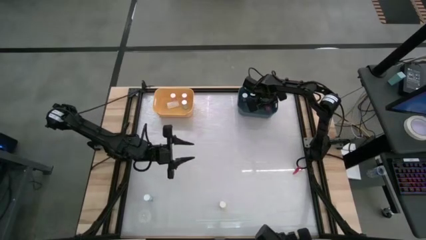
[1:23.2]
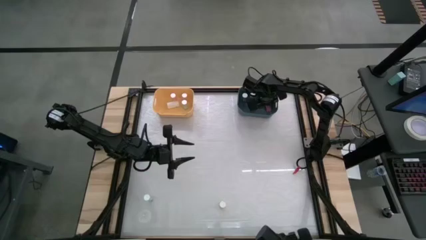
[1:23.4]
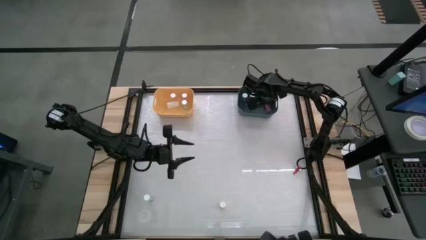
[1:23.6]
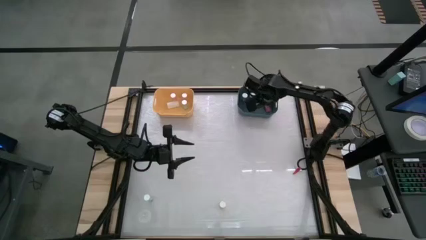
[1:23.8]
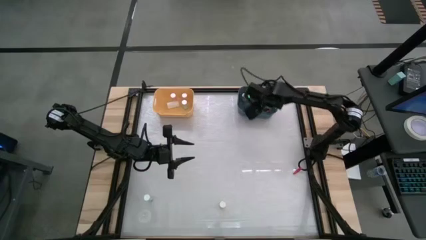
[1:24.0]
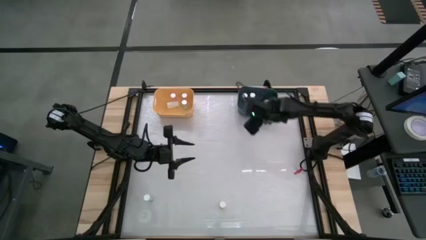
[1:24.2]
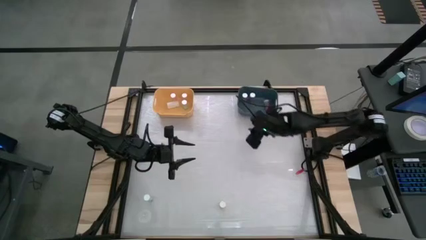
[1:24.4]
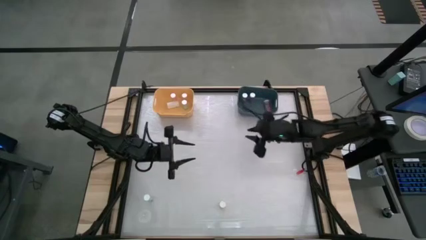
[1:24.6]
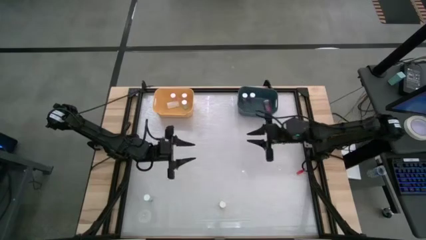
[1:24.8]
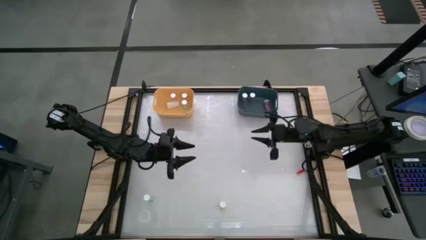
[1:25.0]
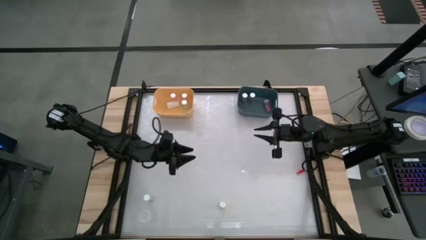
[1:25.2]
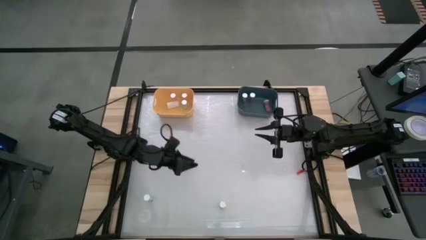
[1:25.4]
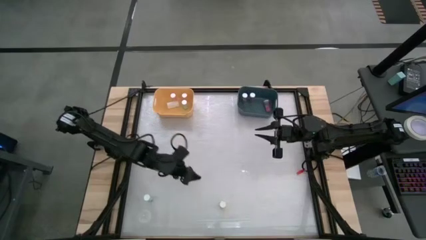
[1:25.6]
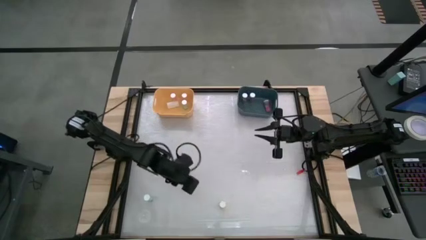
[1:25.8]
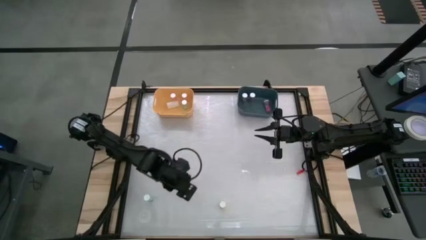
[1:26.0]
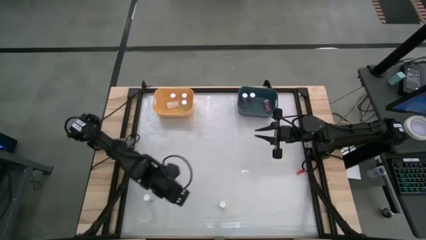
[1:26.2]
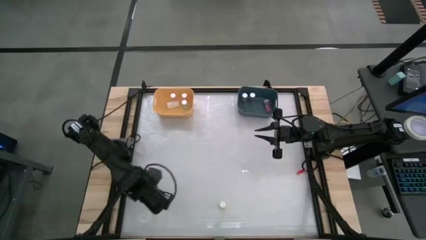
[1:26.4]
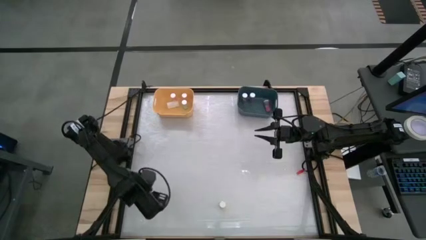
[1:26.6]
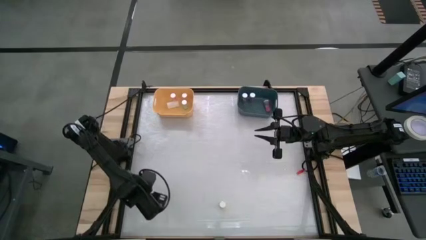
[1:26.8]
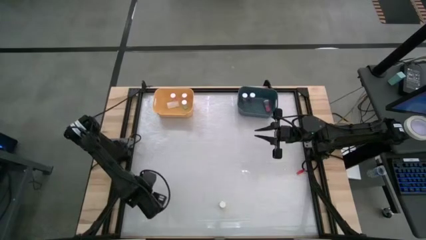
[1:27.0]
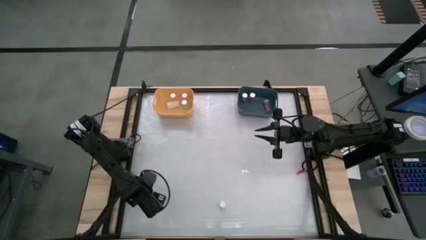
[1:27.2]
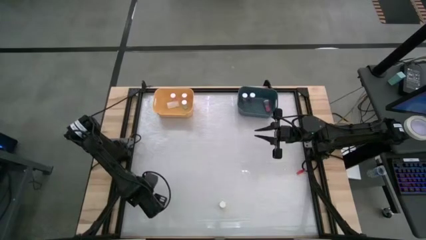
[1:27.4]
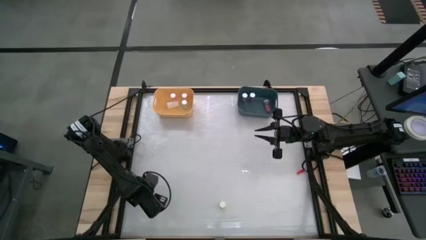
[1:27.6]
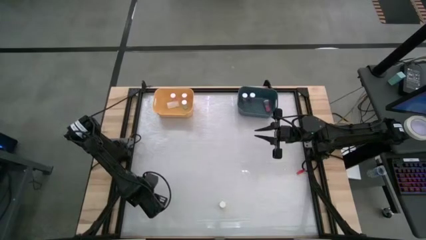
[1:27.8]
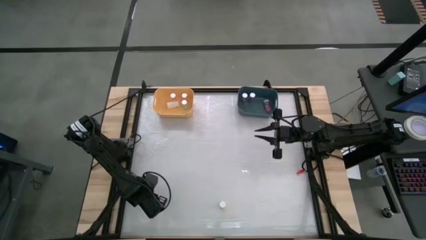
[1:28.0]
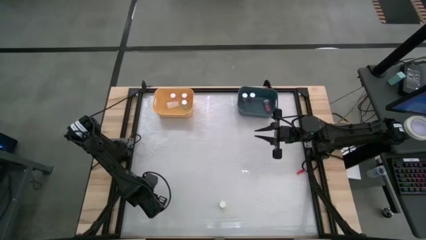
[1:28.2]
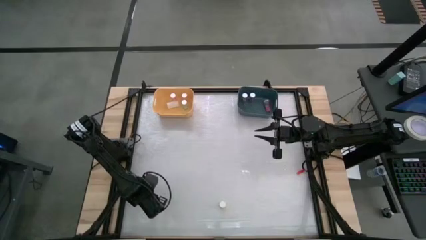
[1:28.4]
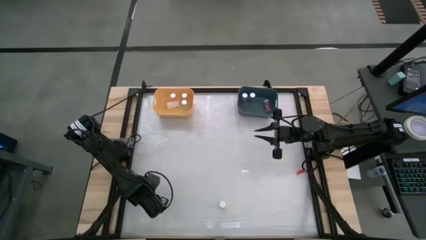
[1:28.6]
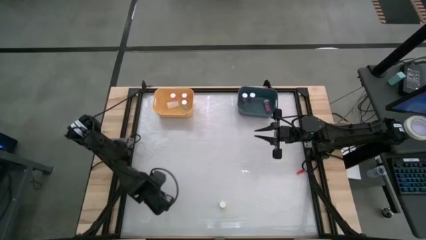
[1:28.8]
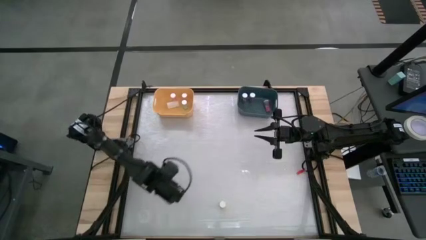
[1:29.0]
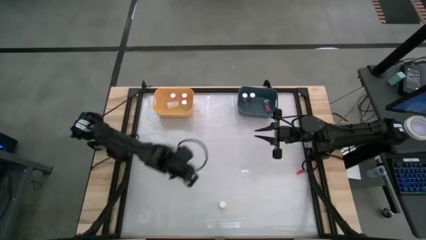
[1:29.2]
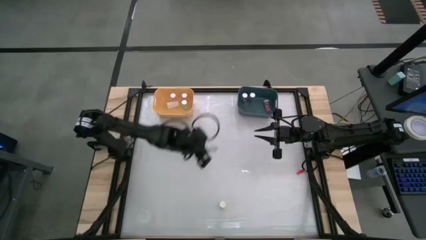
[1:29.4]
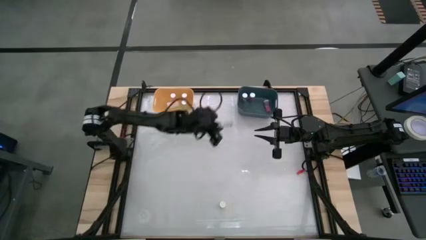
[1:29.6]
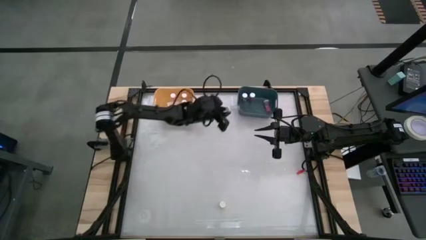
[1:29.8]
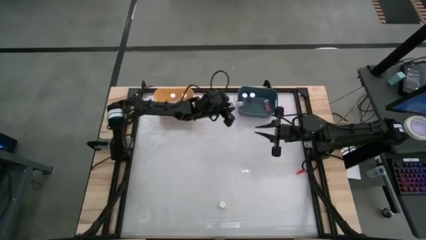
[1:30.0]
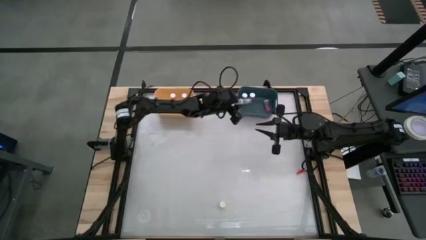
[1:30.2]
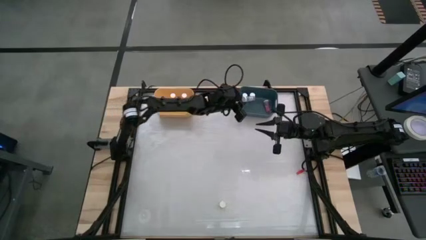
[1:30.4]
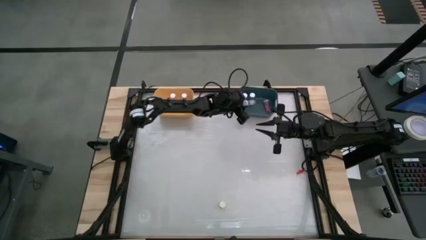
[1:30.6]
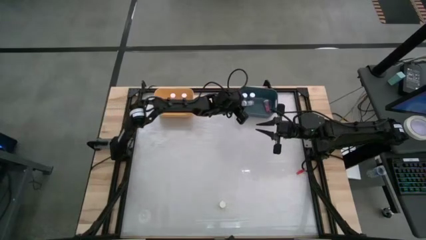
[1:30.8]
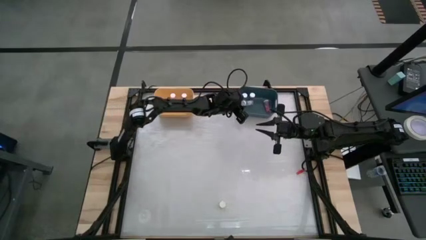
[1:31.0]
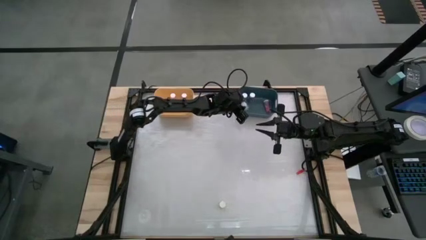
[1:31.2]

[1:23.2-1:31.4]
Task: Pick and place medicine bottles into bin by pill shape (circle, oval)
Put the blue capsule bottle into the blue bin

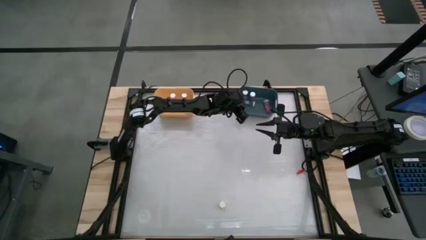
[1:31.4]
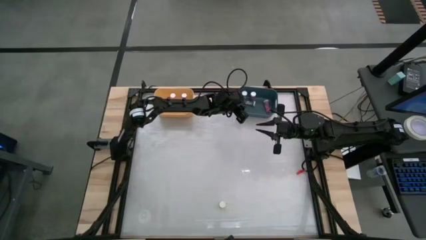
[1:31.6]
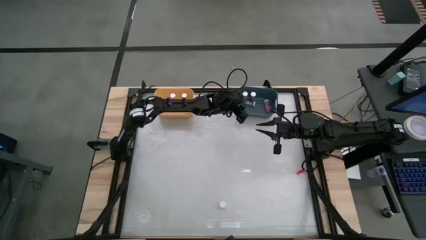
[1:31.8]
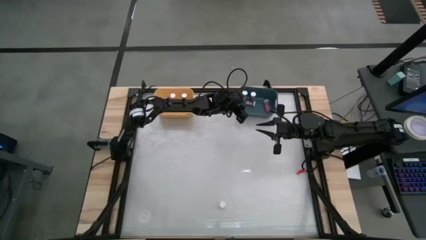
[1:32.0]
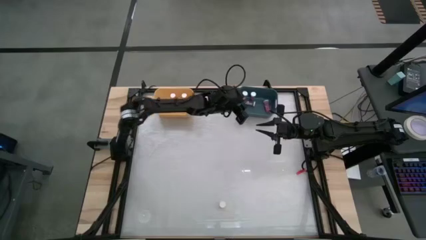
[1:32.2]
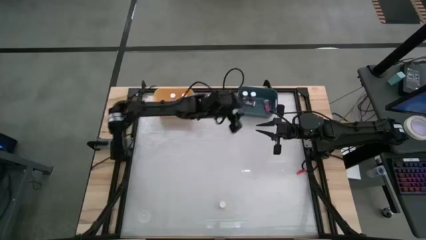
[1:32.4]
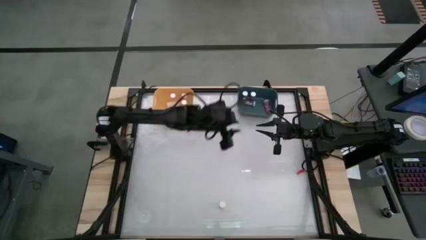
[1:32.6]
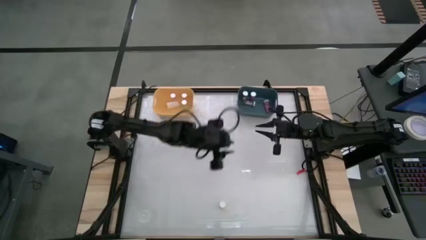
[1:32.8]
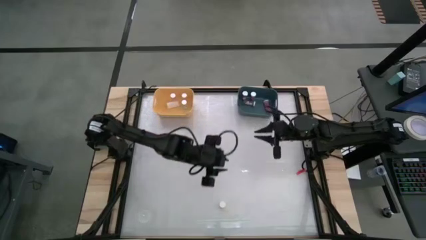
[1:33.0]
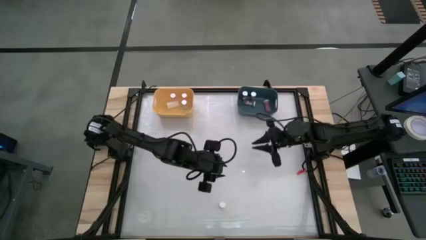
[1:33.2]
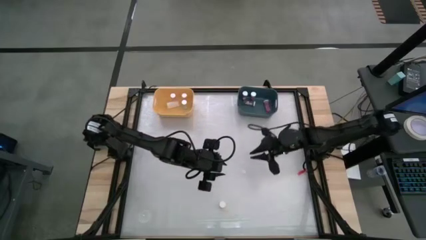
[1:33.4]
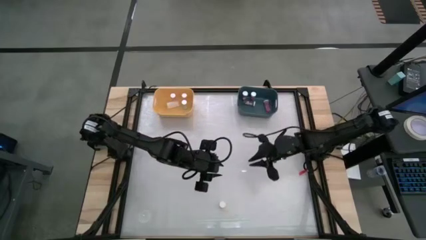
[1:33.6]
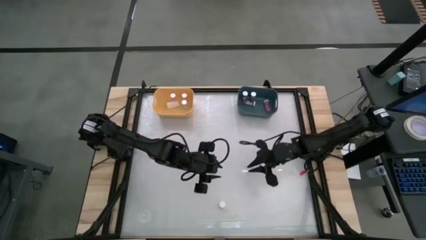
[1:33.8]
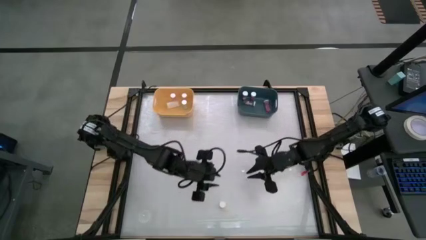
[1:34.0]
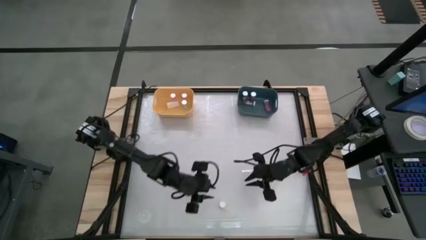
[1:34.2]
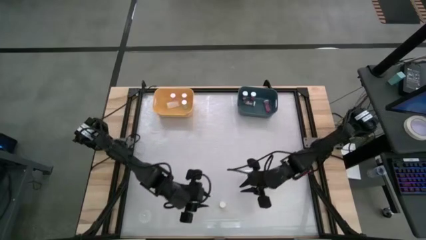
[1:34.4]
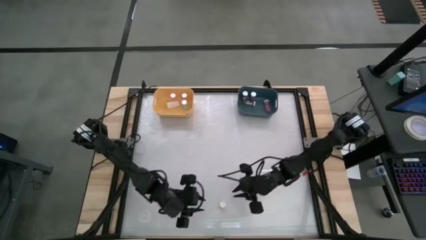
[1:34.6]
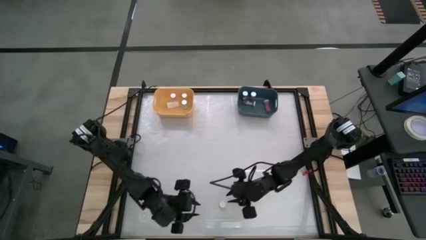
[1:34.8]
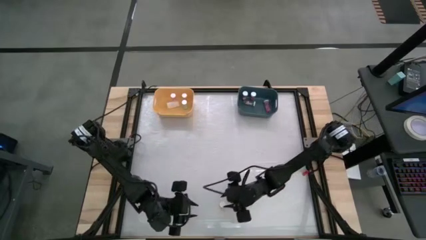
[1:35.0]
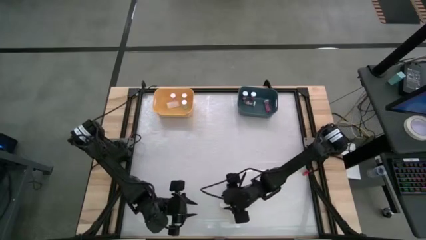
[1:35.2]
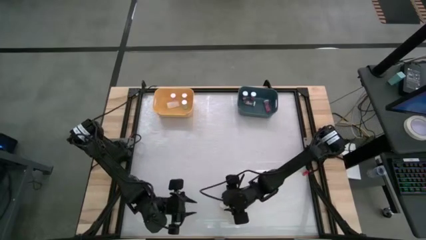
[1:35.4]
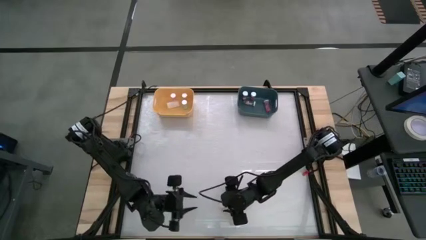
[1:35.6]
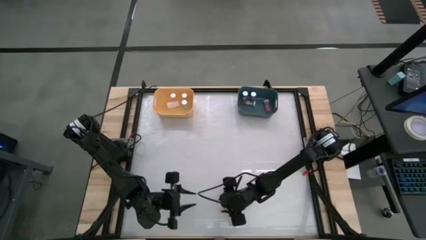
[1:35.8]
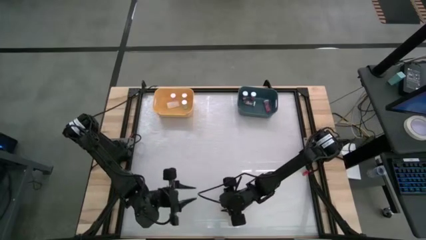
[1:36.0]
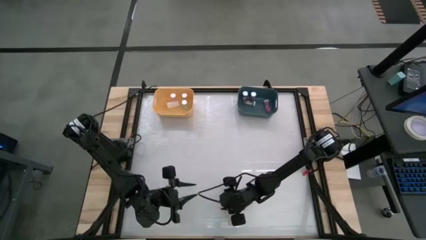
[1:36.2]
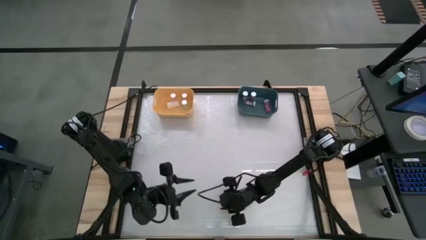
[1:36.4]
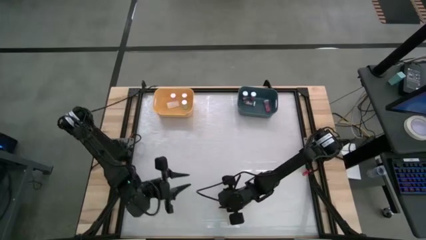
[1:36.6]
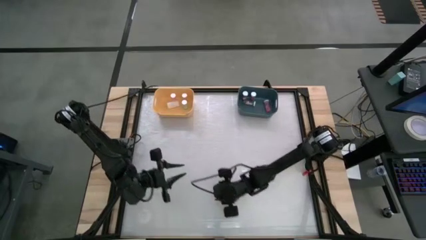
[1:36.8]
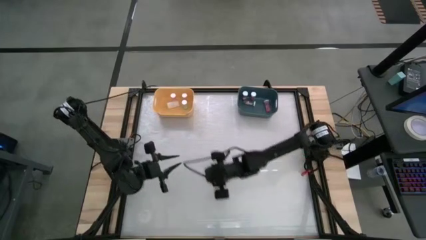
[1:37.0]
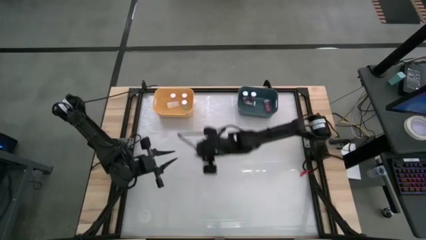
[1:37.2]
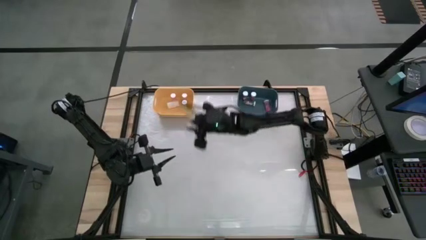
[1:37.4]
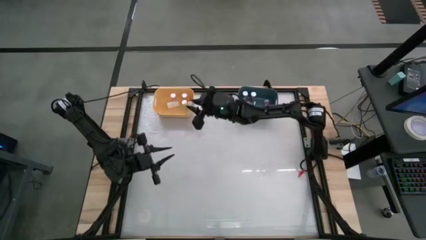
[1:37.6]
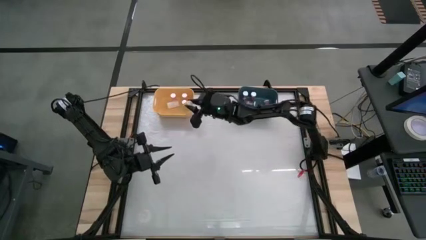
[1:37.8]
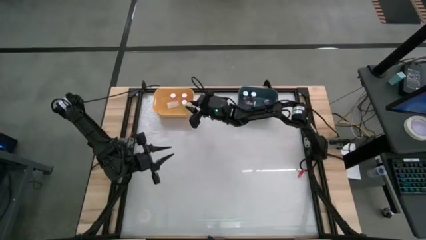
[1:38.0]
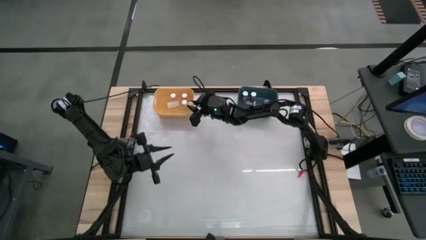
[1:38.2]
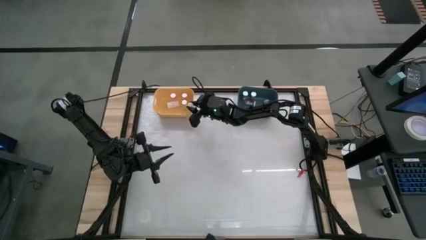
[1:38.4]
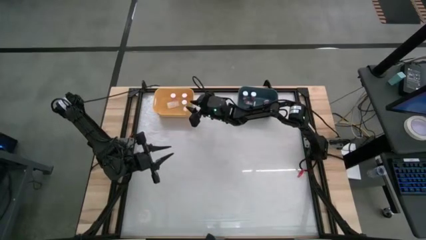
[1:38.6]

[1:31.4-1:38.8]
Put the orange tablet bottle into the yellow bin
